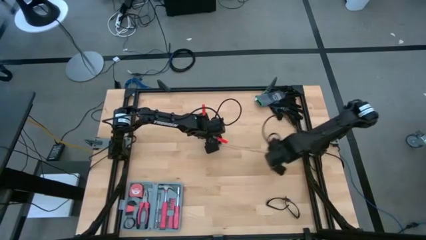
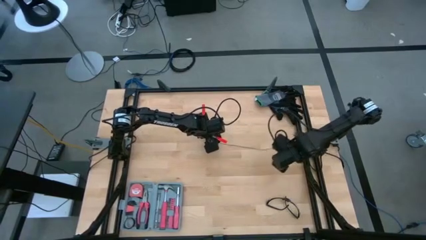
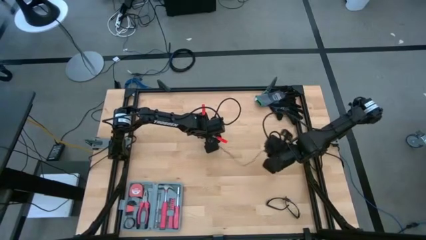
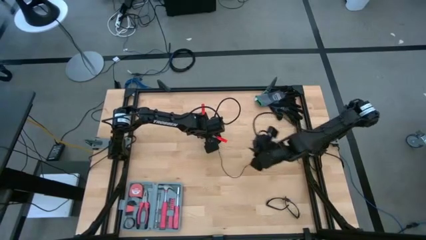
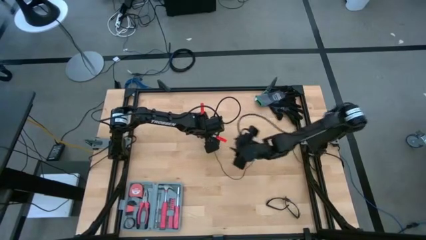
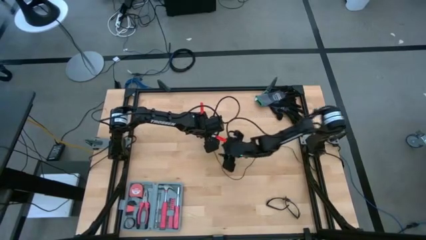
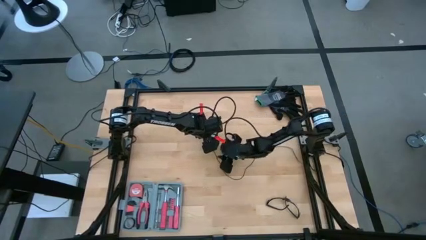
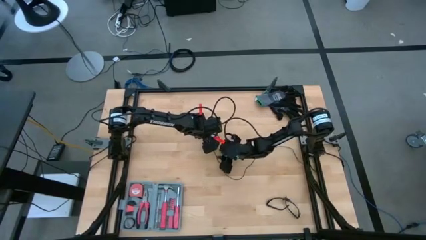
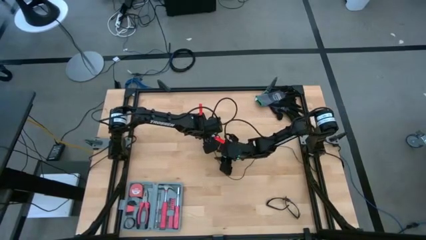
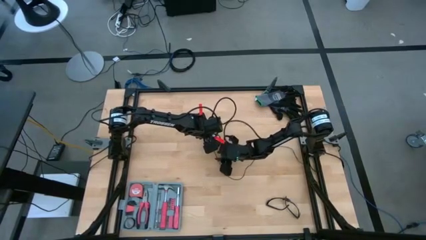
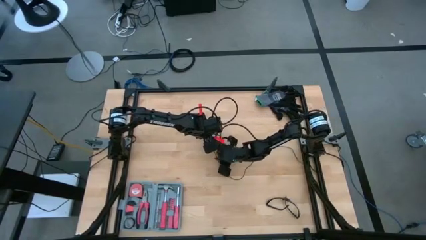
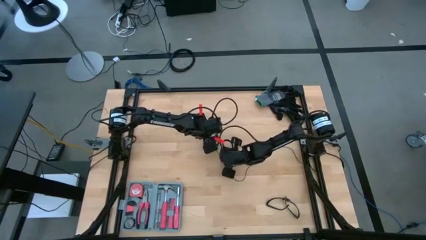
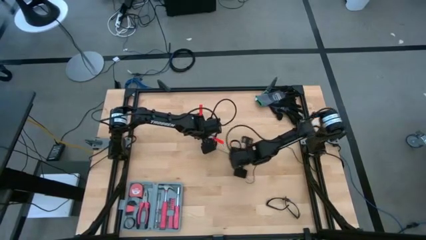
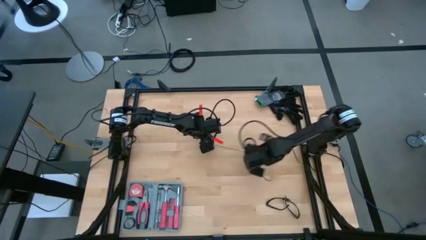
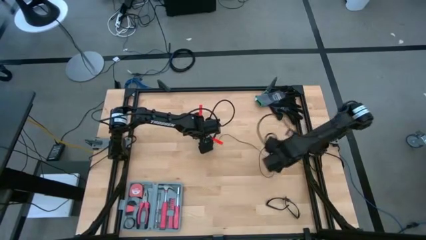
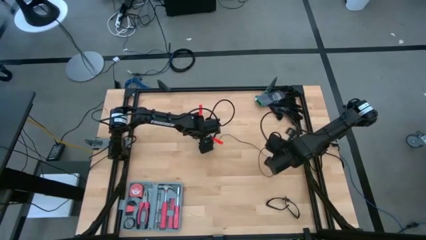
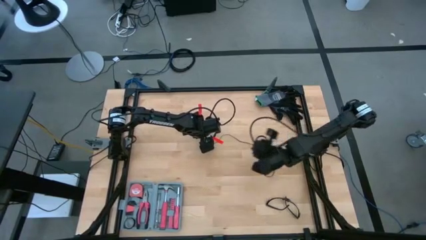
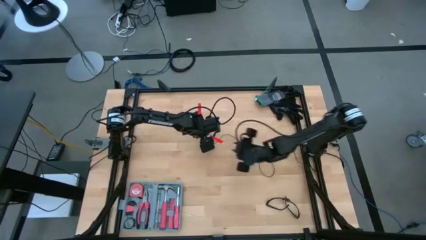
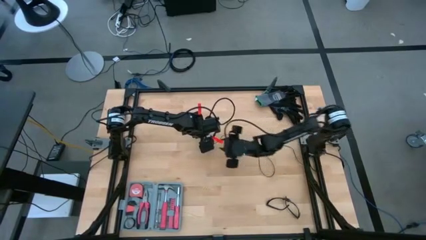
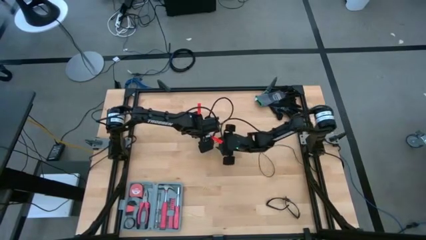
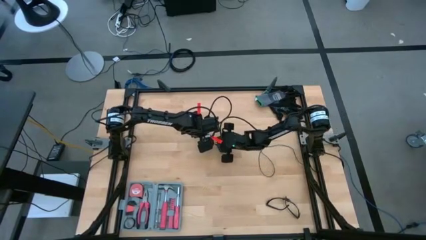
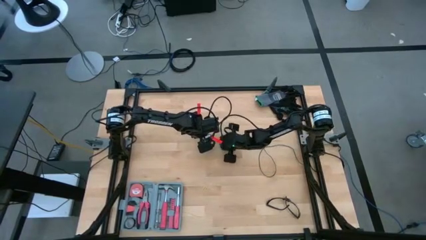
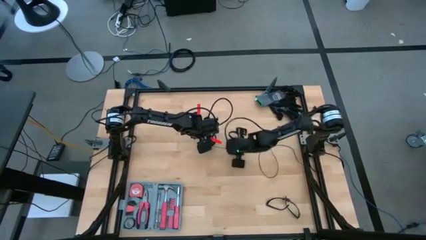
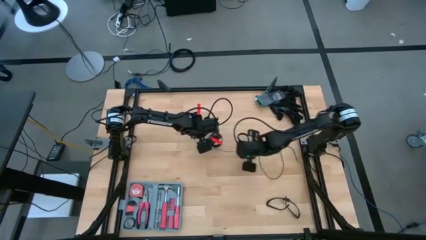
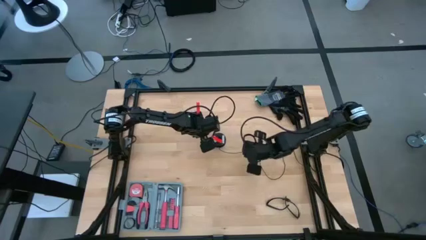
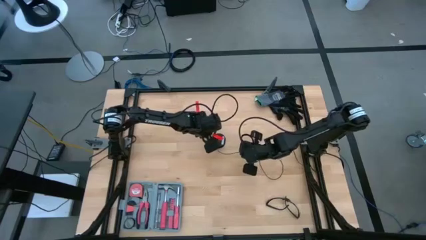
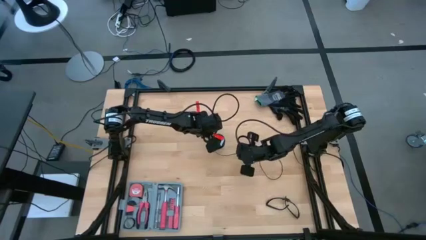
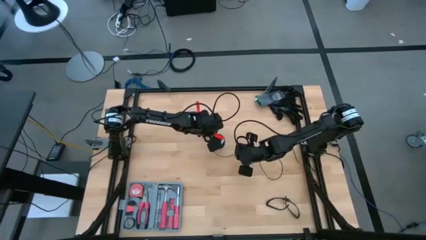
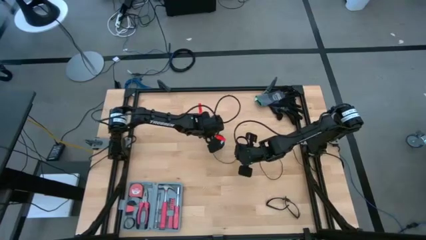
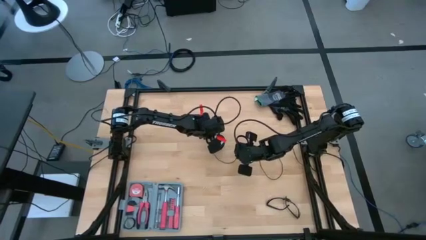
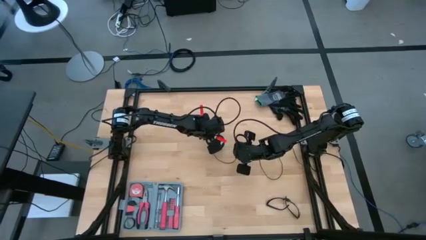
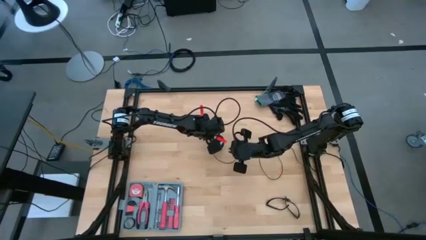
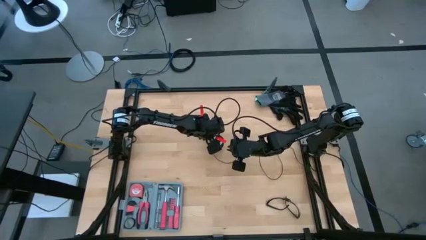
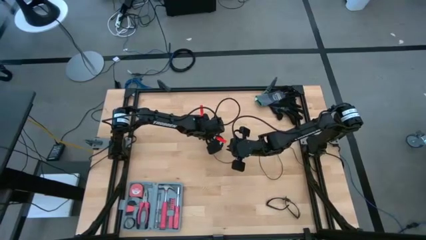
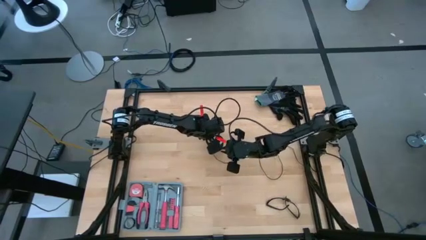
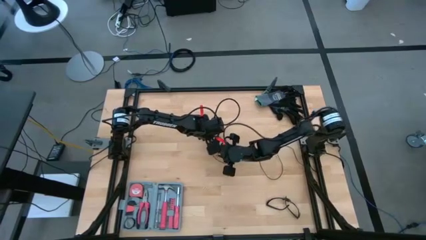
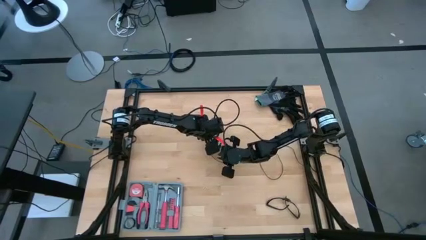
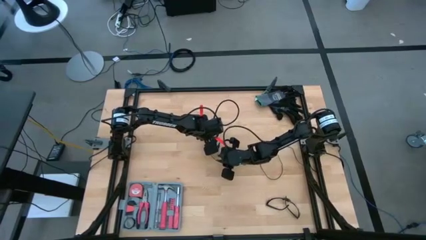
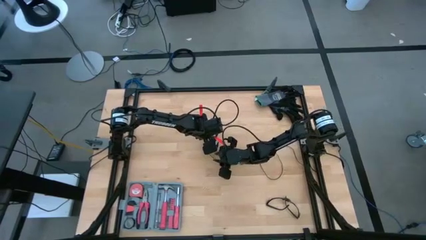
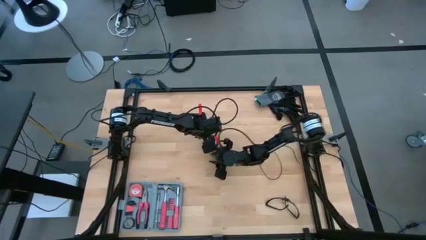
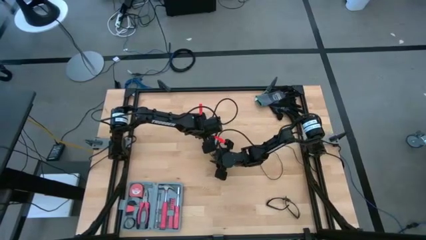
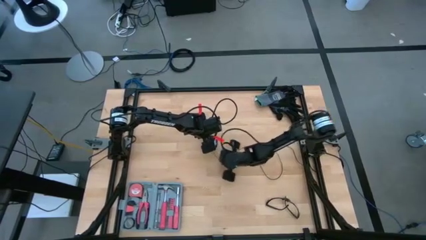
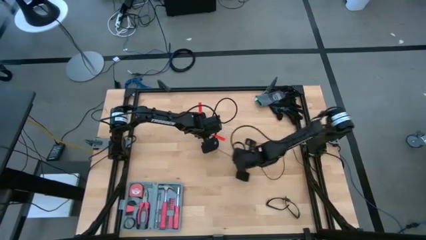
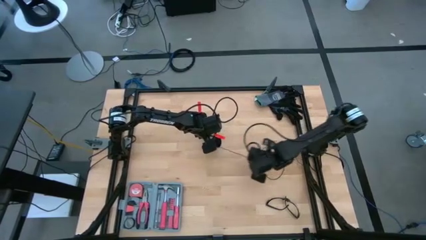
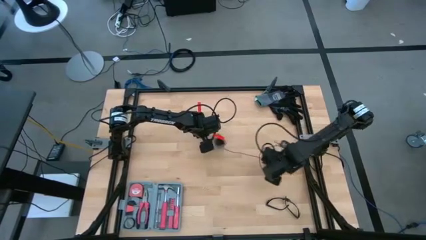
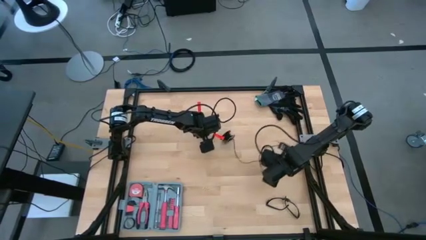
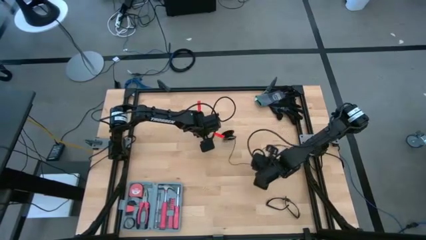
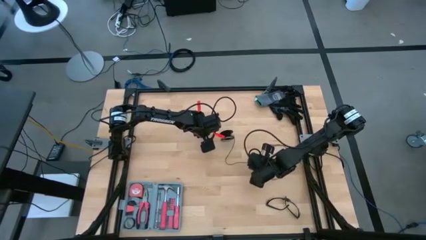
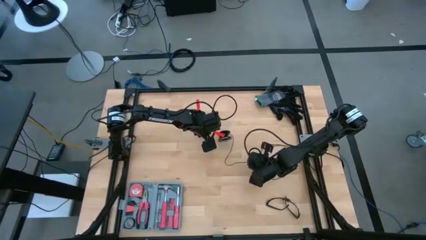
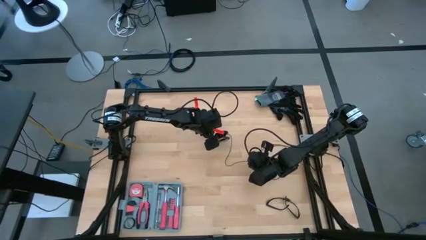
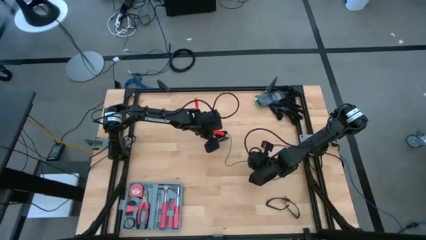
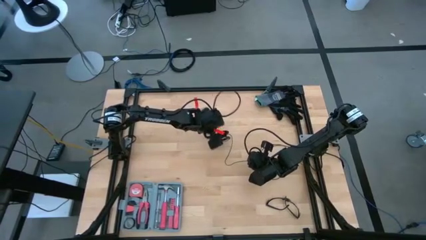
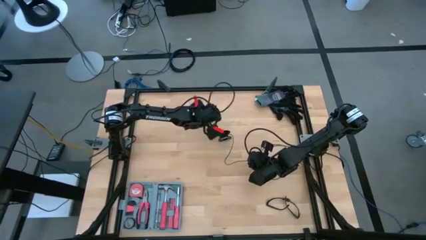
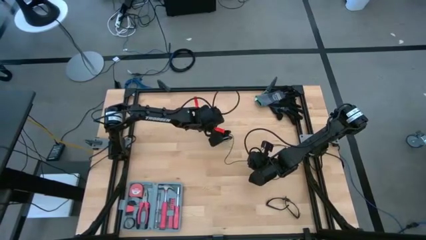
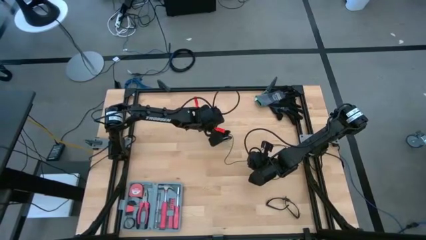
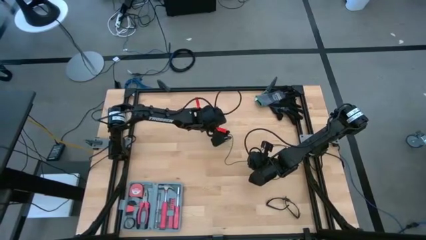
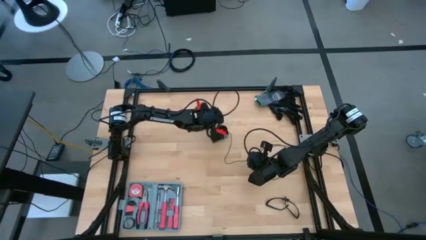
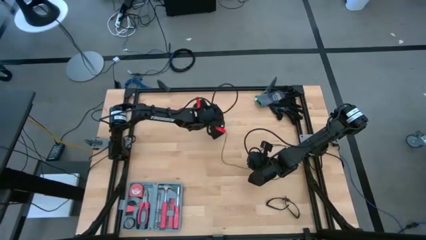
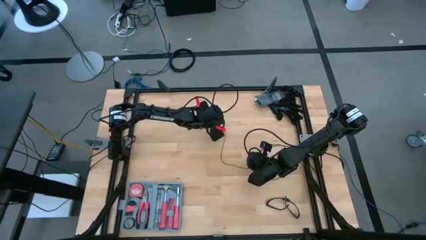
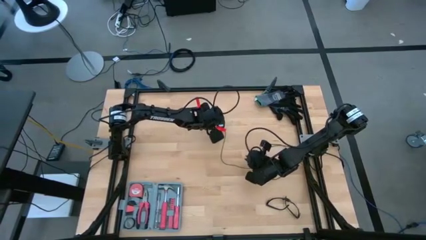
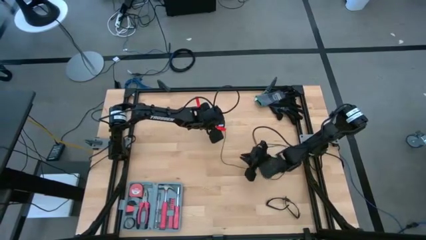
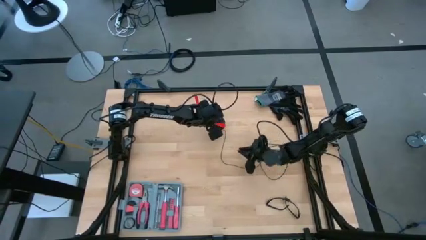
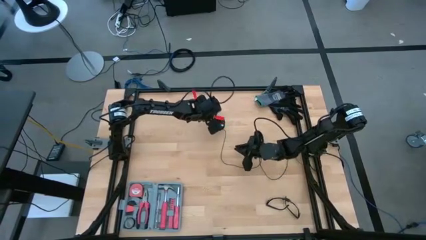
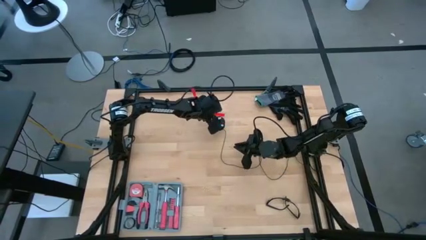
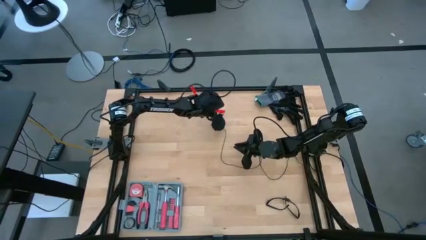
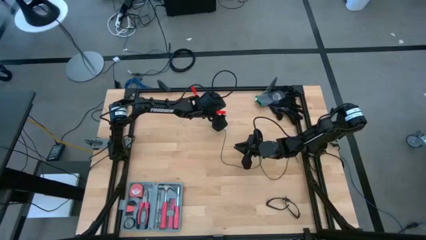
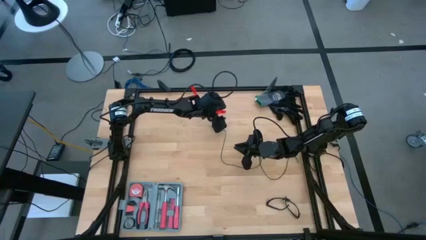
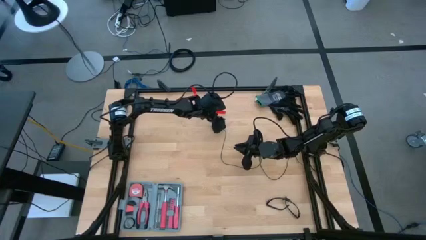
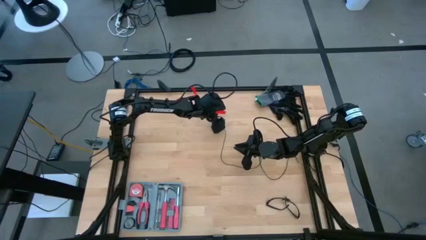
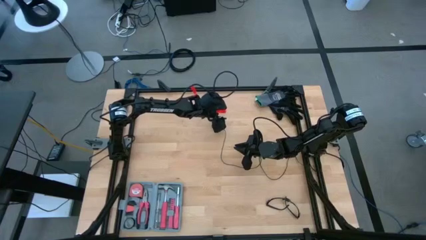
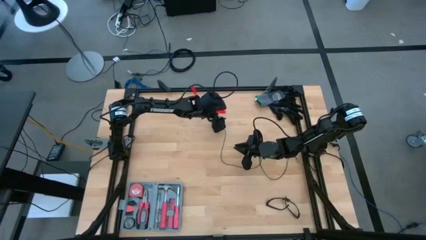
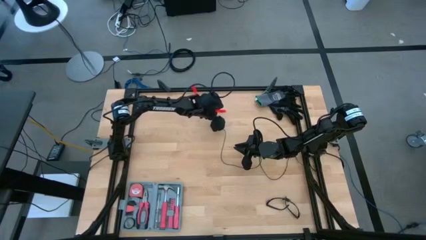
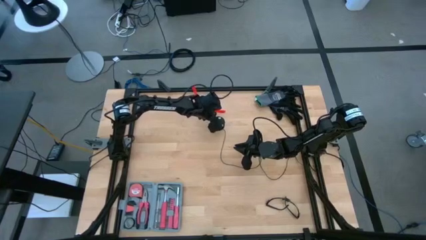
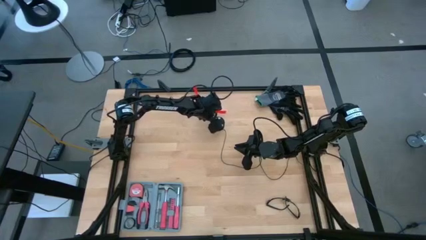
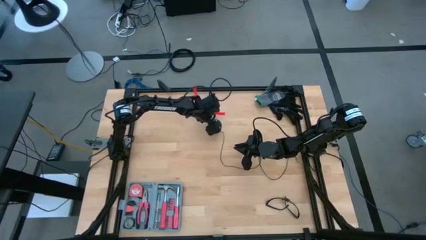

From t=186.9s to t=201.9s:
Task: Coil cords
Uncoil the black wire from the spool
